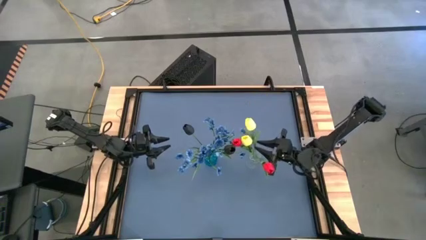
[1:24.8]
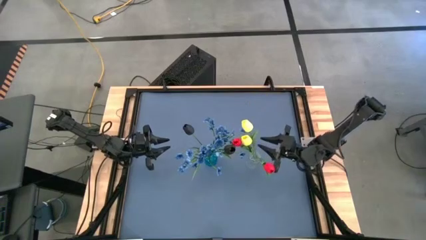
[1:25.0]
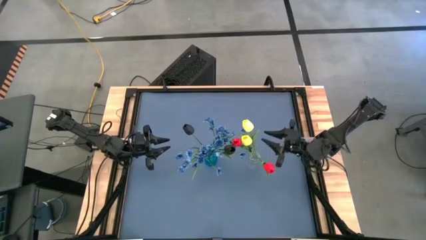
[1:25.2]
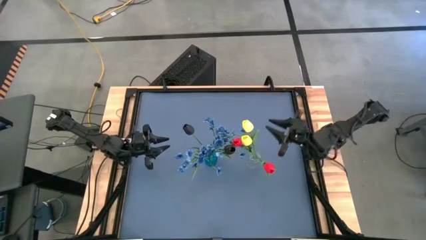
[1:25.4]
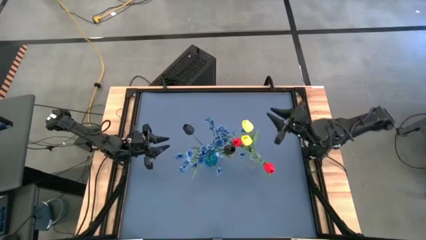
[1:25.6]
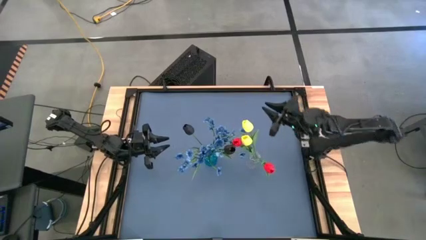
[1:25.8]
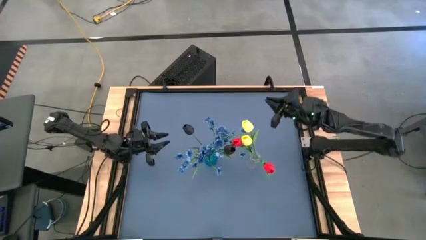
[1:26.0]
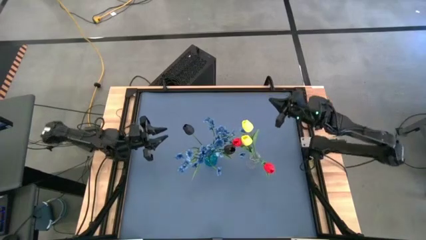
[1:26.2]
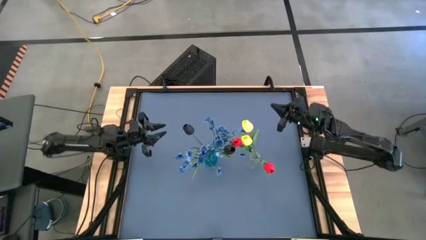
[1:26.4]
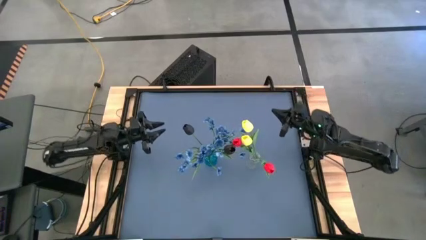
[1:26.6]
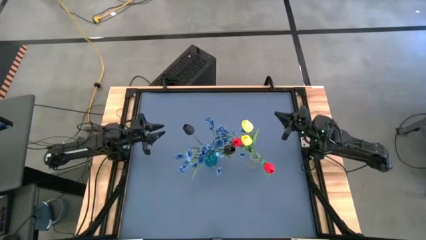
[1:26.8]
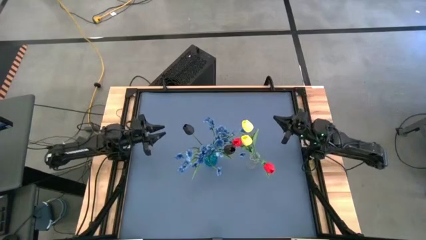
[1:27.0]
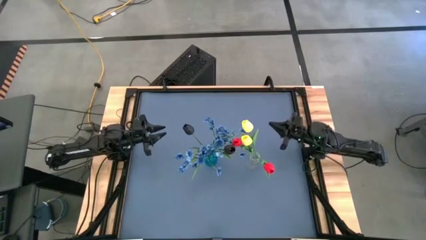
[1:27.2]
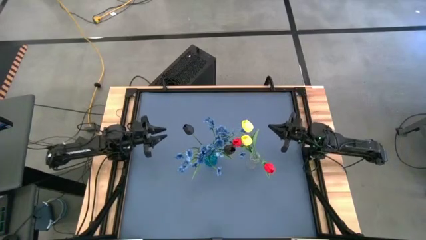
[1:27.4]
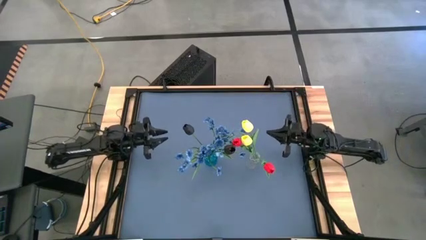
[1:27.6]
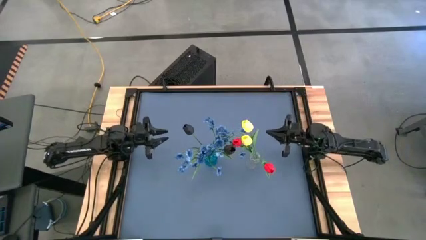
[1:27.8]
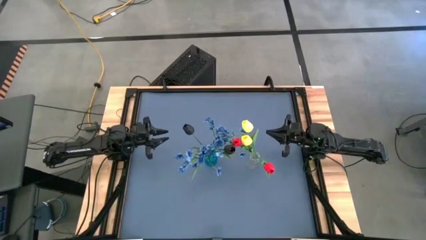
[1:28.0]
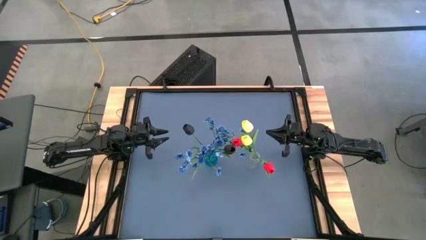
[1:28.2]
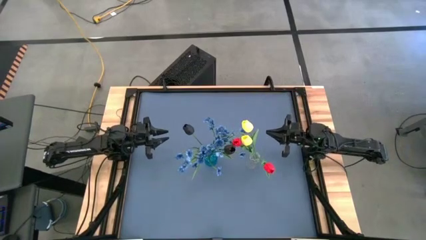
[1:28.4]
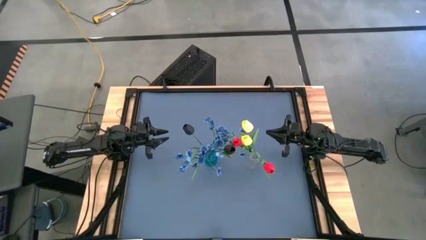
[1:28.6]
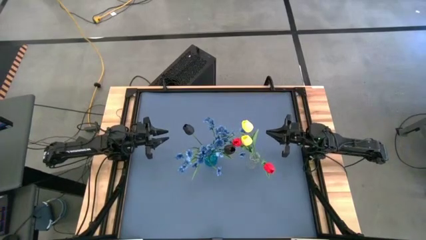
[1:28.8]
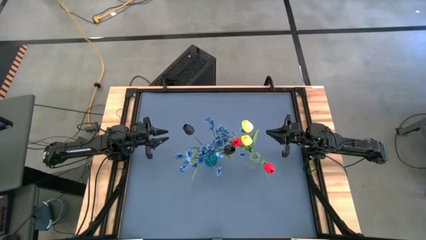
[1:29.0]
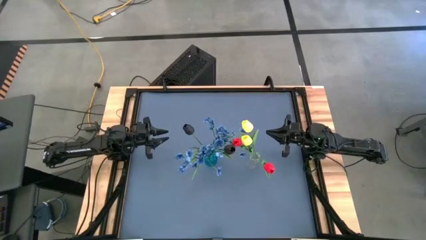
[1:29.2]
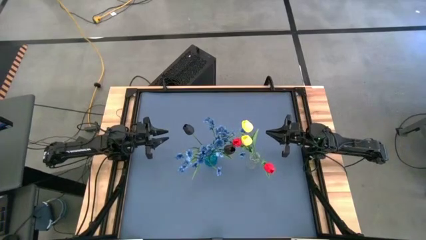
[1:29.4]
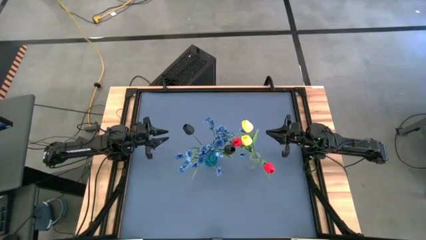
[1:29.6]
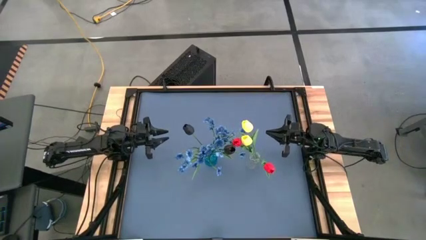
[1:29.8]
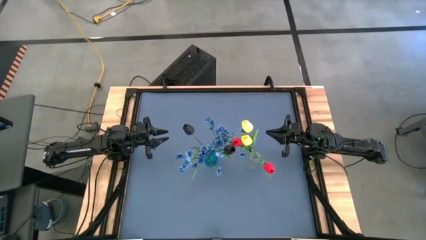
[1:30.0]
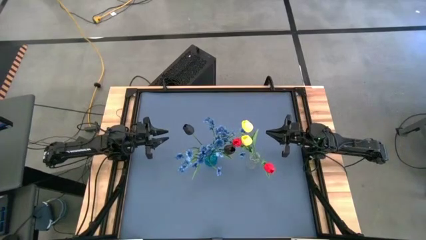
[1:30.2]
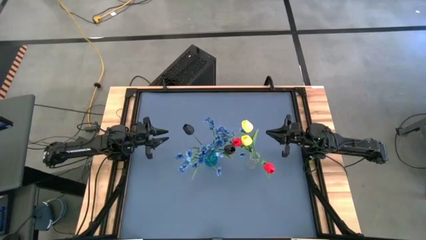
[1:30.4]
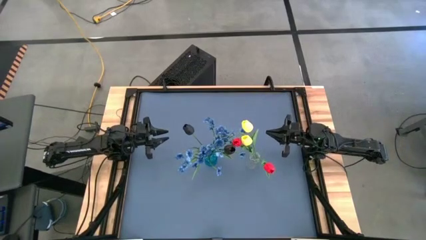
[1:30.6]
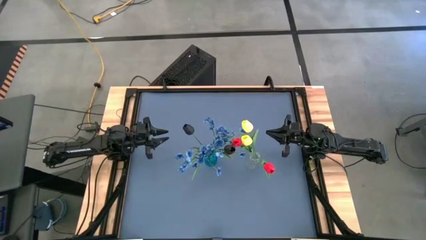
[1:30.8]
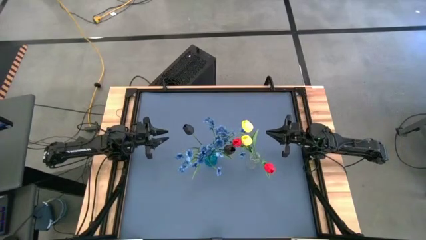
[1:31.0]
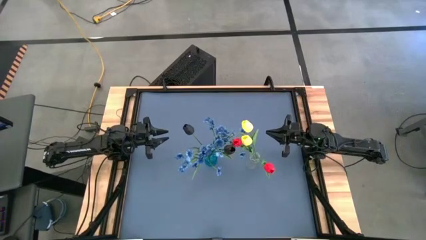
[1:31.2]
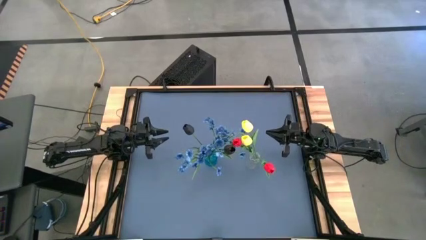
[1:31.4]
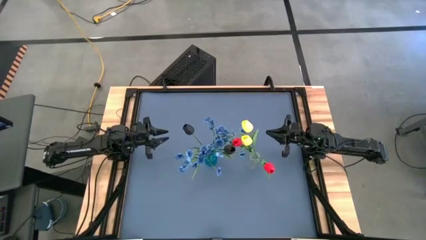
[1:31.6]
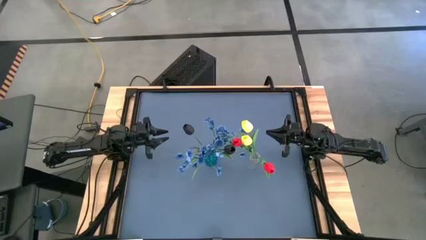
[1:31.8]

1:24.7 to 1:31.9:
Task: Sort flowers into vase by color
Return to Home Position

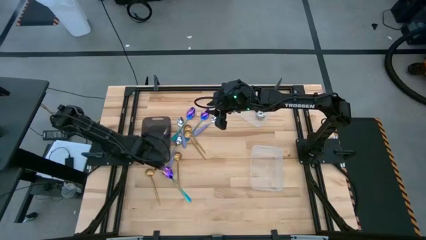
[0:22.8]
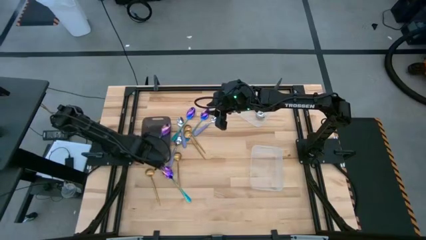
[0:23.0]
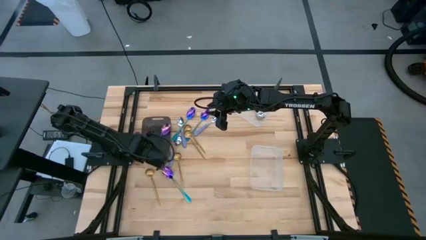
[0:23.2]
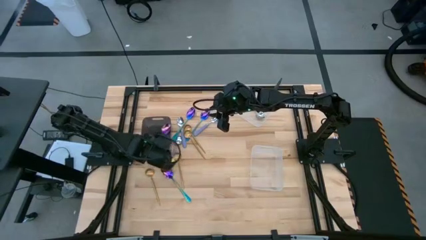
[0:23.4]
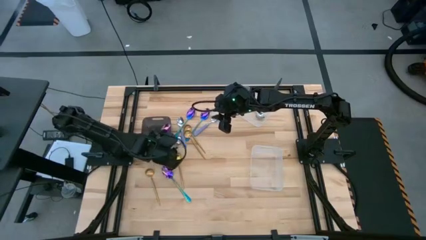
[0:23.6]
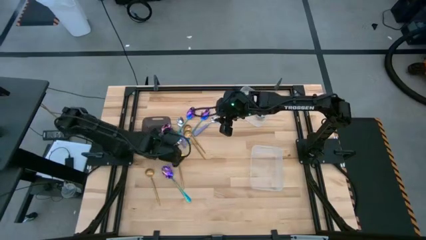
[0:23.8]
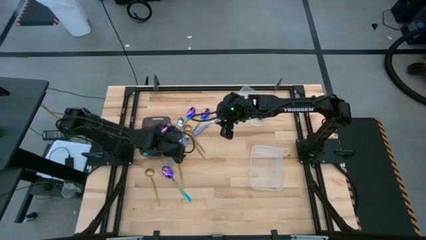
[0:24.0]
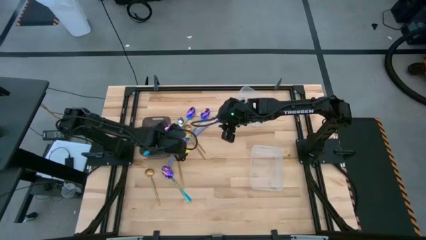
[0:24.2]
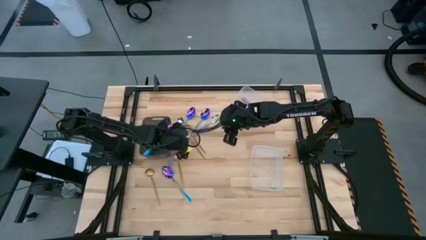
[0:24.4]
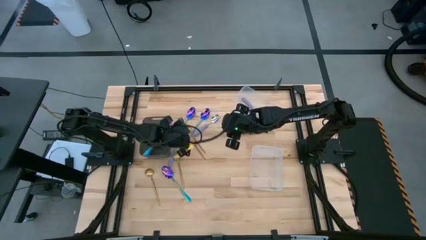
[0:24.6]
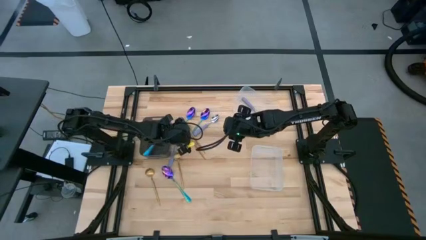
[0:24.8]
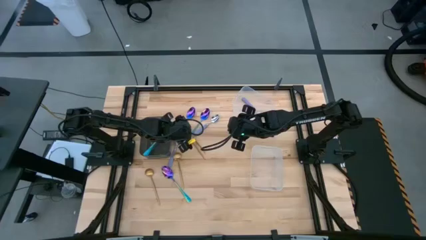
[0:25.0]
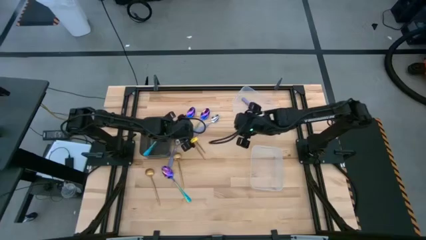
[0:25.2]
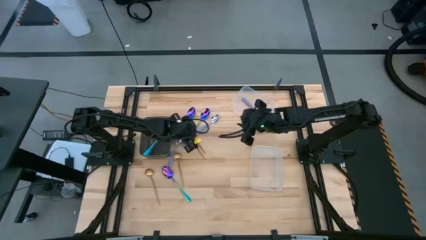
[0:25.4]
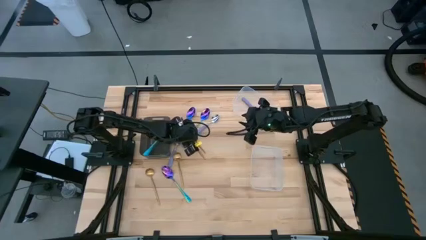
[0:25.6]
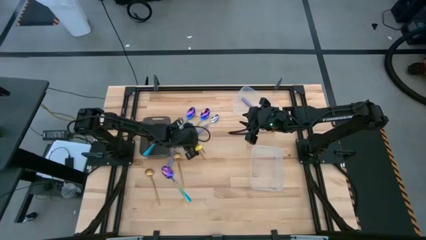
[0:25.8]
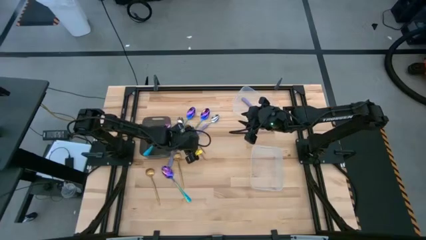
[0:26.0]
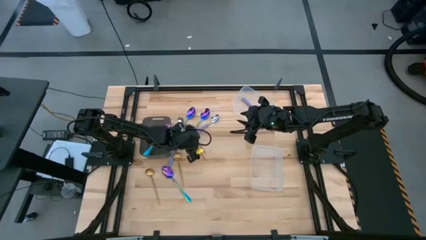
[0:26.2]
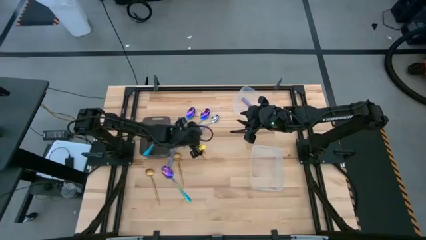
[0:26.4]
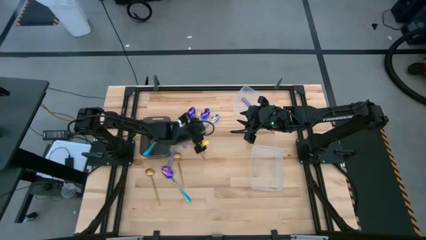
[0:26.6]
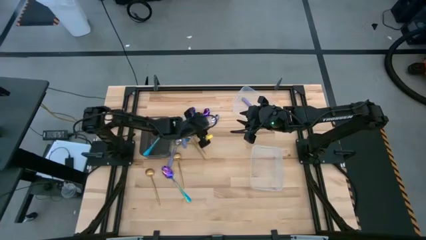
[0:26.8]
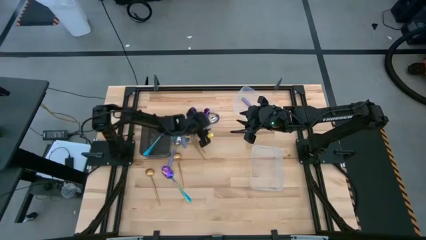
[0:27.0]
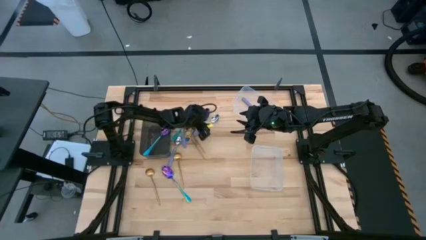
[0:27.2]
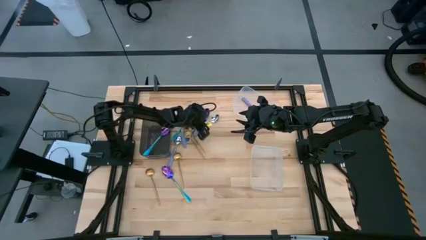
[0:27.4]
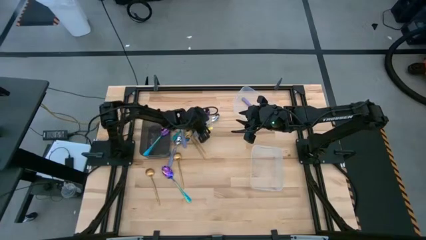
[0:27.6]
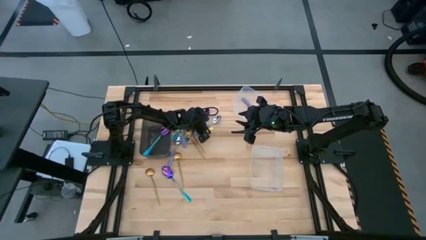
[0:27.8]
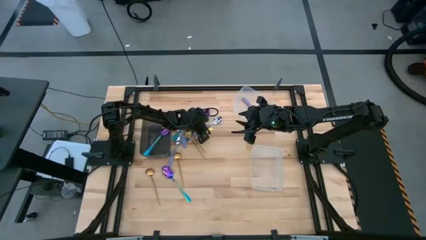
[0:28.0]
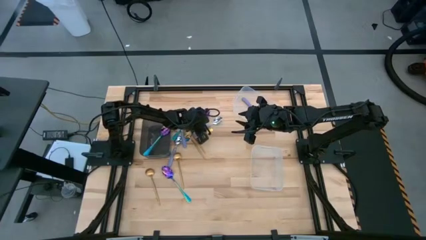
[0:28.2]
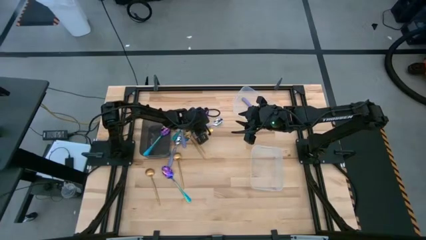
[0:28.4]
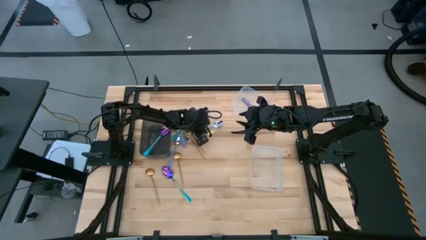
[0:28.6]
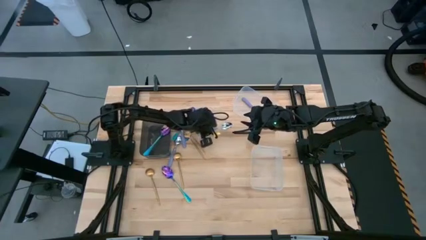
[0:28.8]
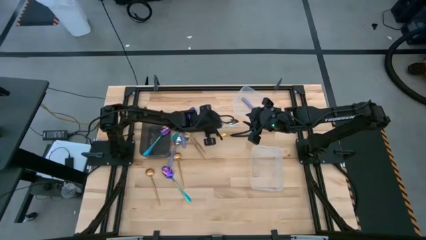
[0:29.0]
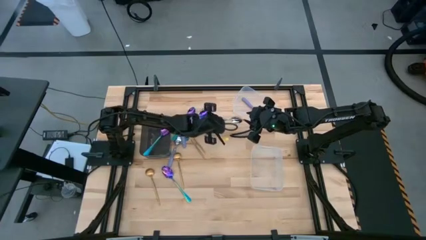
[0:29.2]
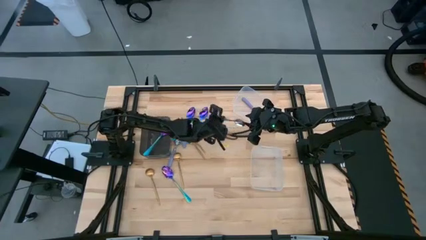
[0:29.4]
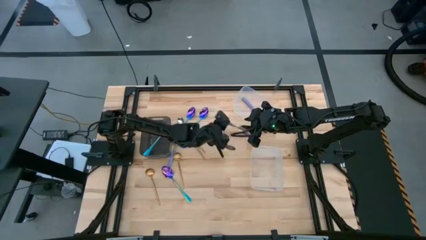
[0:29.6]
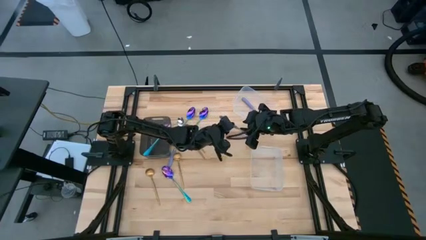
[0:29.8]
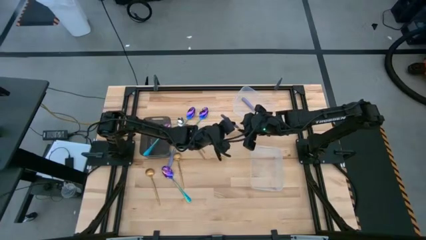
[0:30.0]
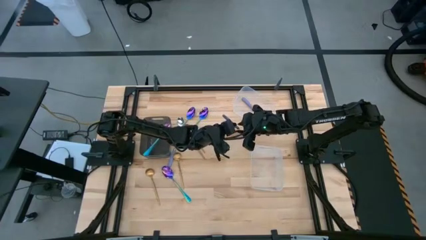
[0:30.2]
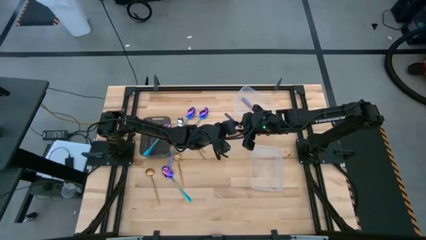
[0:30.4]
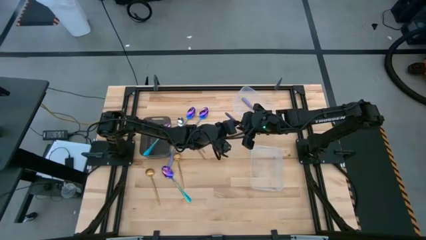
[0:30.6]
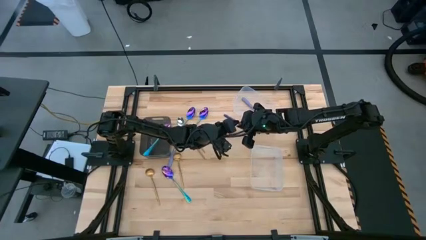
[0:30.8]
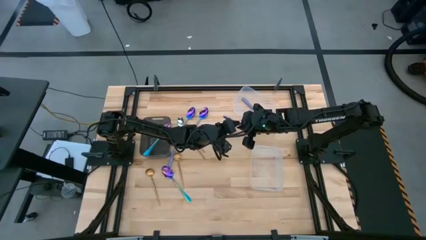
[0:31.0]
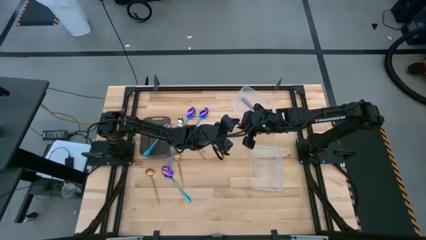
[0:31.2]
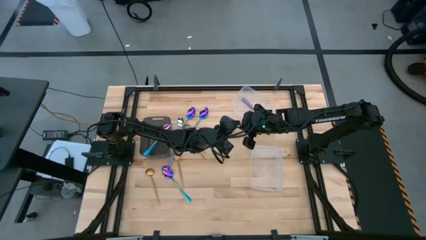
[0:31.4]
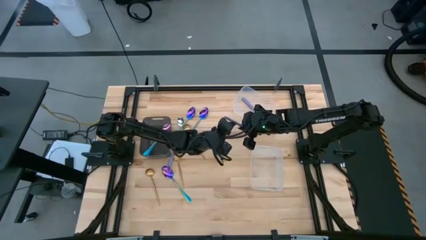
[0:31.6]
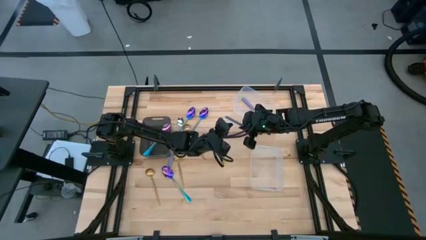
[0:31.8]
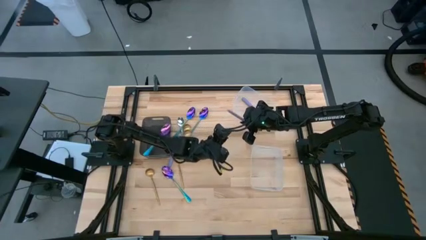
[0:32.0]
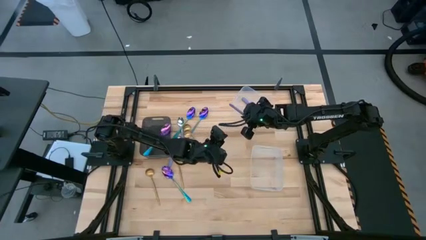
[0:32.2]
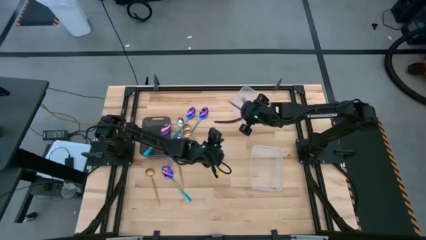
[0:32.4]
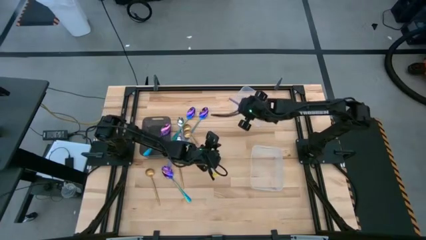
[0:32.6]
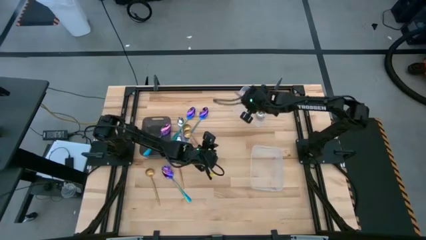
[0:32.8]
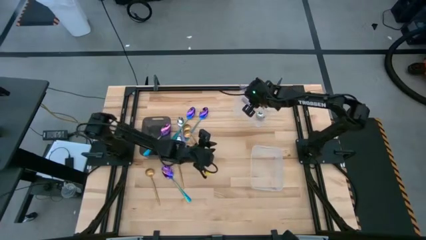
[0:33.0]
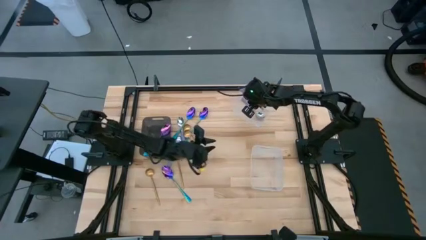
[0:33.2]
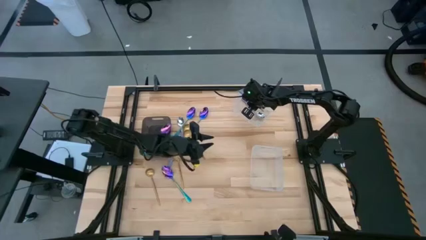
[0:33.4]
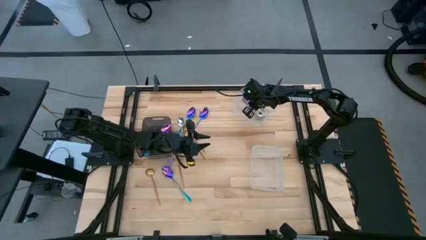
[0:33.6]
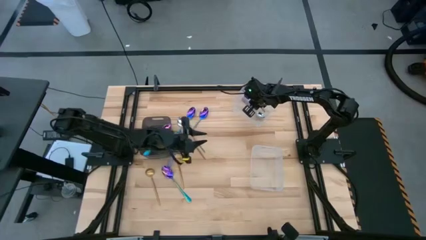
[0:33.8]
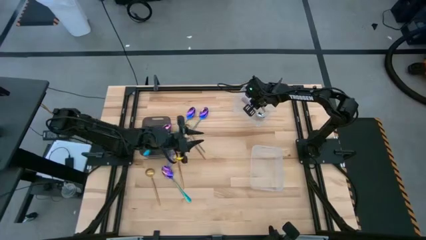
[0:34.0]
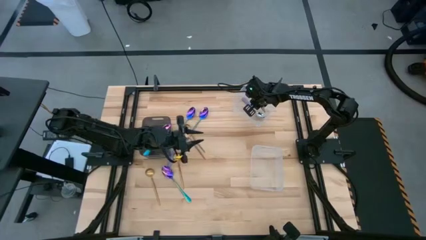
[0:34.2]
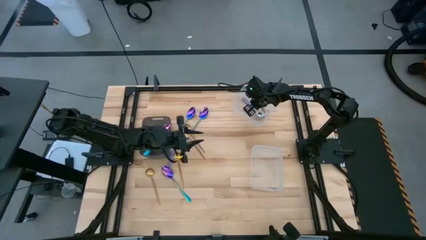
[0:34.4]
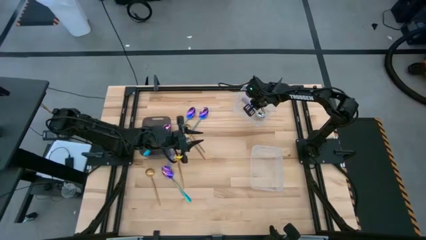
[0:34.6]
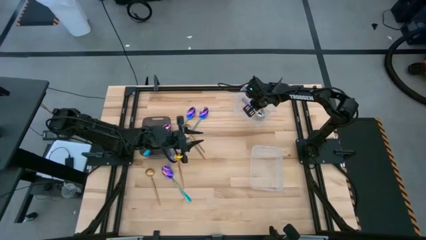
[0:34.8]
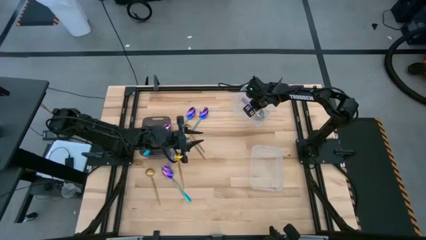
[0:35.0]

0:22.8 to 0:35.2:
Task: Sort silverware by color (type)
Put the purple spoon into the top transparent bin
